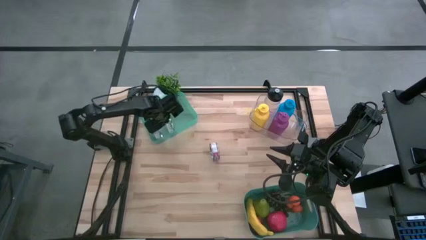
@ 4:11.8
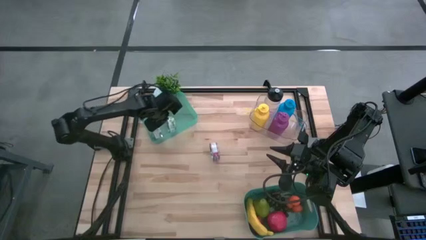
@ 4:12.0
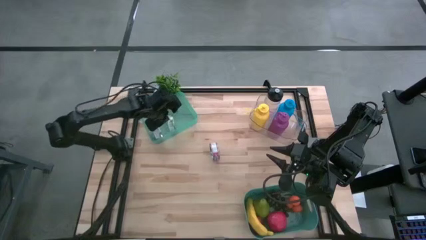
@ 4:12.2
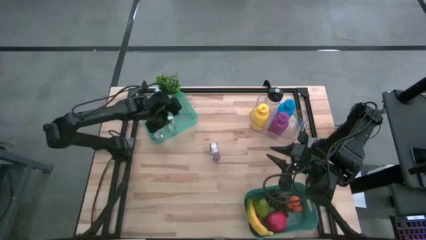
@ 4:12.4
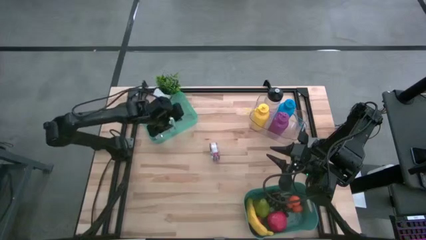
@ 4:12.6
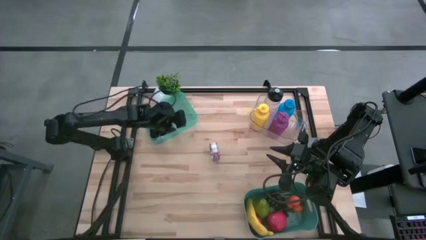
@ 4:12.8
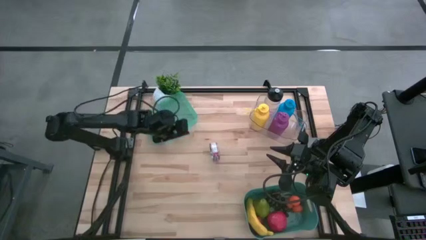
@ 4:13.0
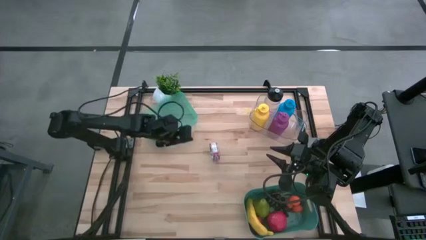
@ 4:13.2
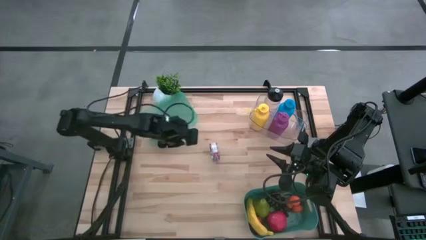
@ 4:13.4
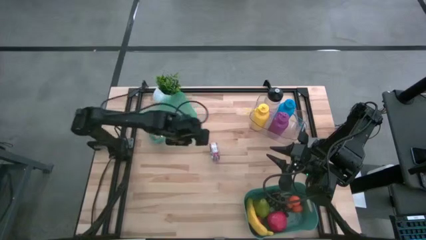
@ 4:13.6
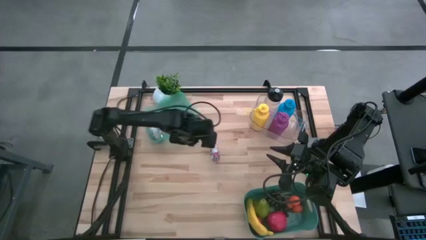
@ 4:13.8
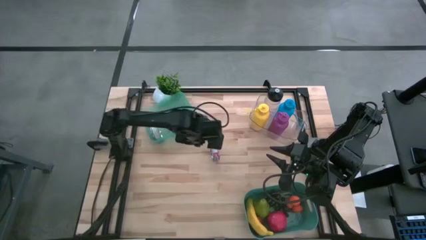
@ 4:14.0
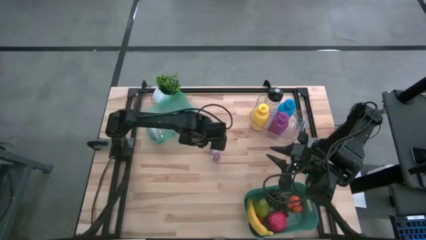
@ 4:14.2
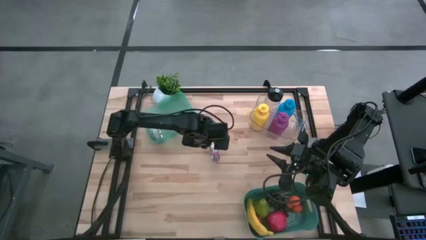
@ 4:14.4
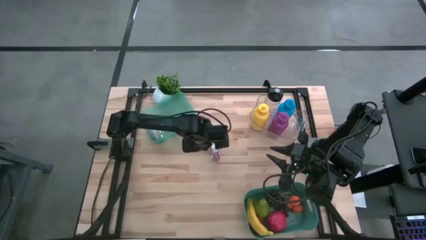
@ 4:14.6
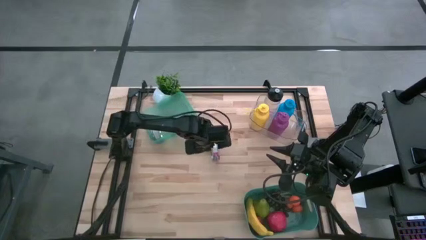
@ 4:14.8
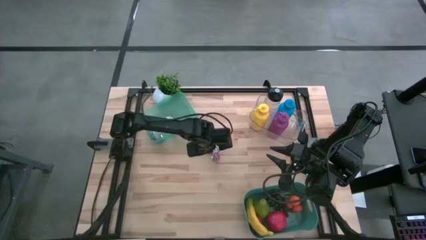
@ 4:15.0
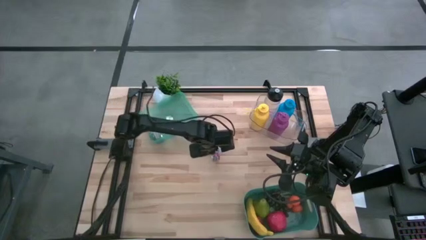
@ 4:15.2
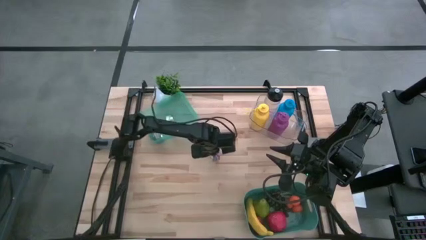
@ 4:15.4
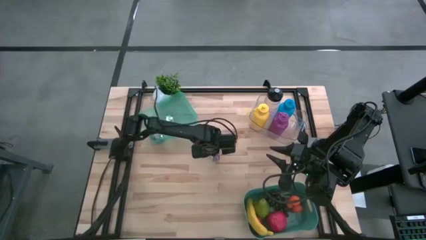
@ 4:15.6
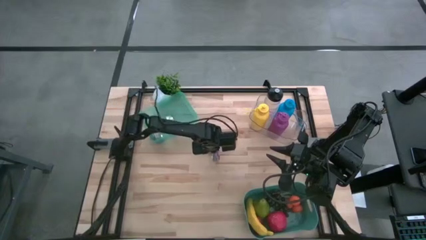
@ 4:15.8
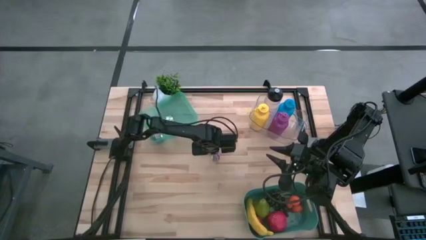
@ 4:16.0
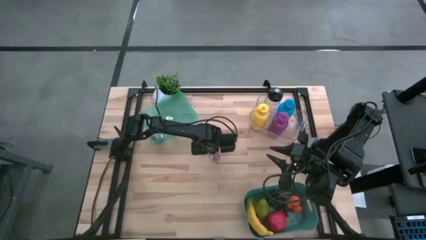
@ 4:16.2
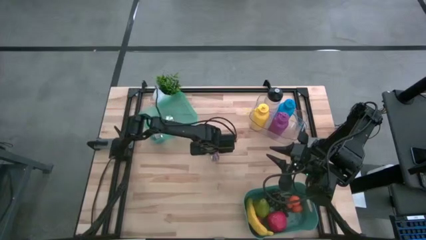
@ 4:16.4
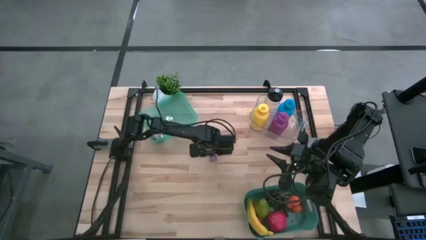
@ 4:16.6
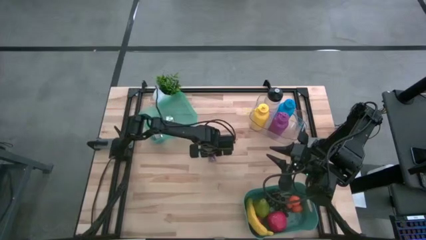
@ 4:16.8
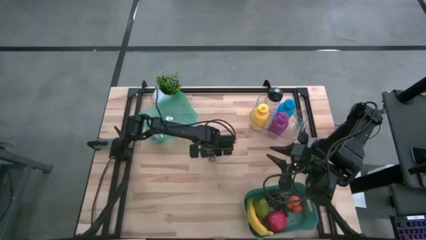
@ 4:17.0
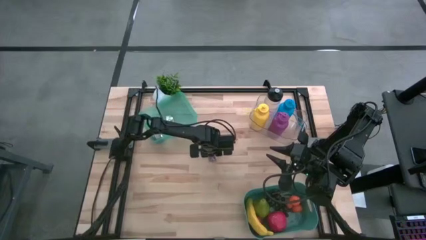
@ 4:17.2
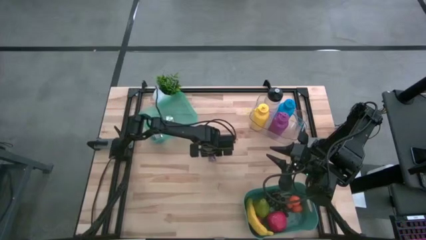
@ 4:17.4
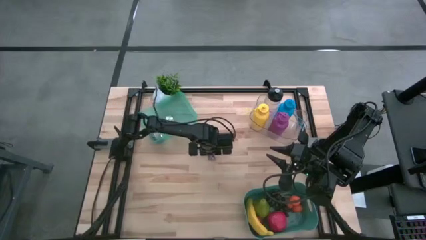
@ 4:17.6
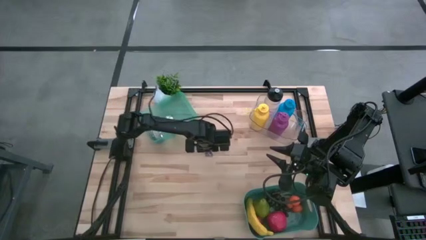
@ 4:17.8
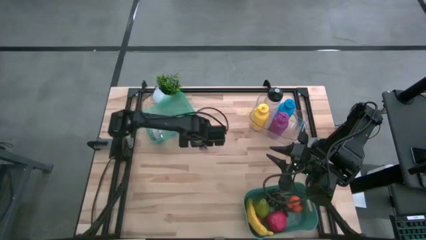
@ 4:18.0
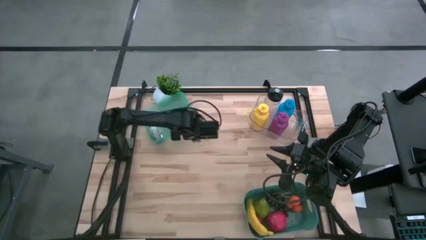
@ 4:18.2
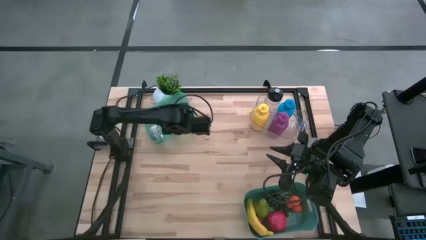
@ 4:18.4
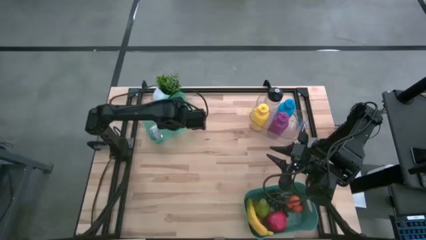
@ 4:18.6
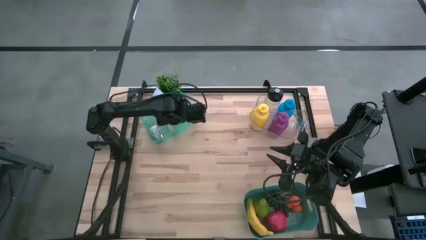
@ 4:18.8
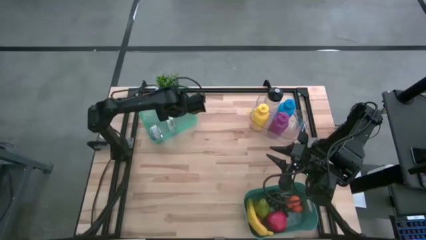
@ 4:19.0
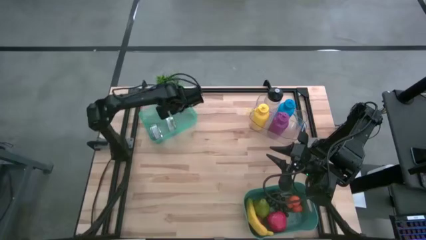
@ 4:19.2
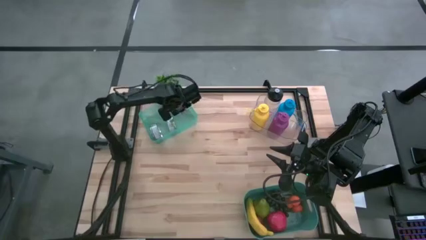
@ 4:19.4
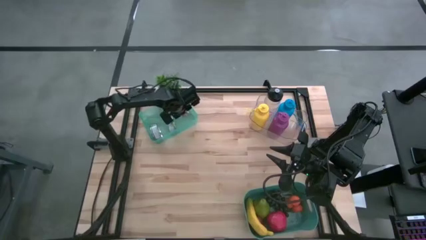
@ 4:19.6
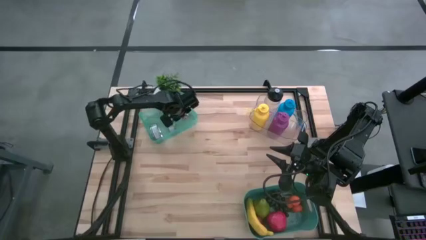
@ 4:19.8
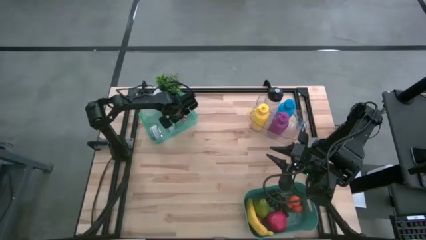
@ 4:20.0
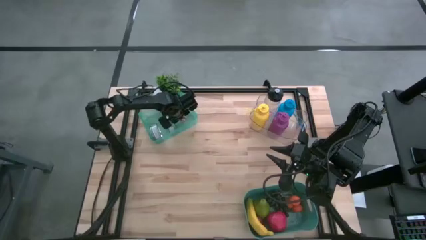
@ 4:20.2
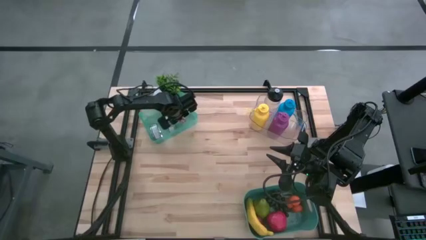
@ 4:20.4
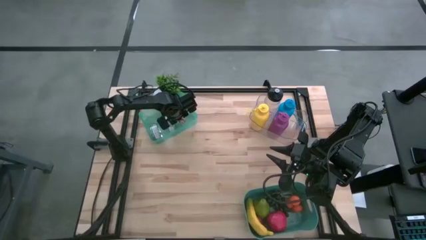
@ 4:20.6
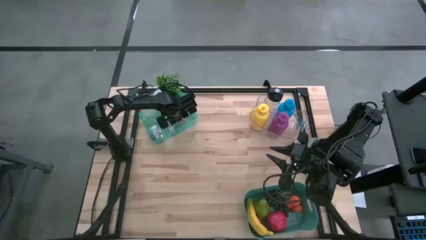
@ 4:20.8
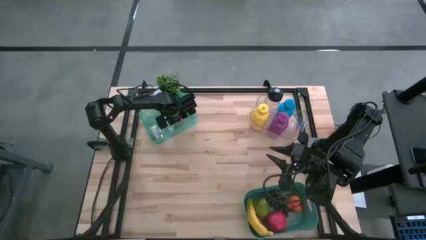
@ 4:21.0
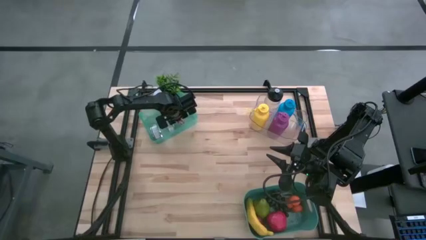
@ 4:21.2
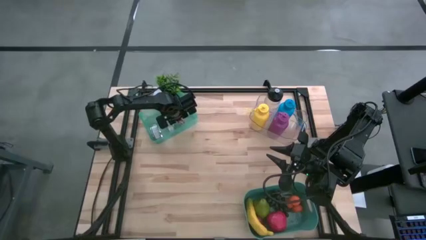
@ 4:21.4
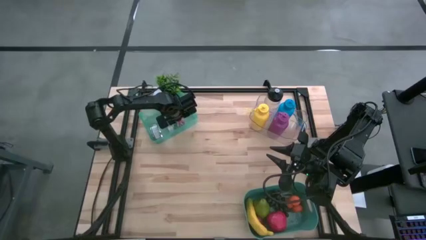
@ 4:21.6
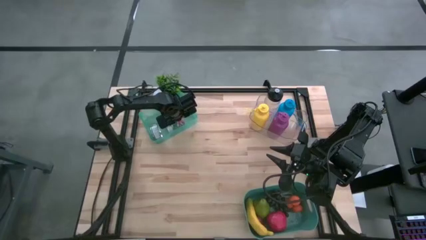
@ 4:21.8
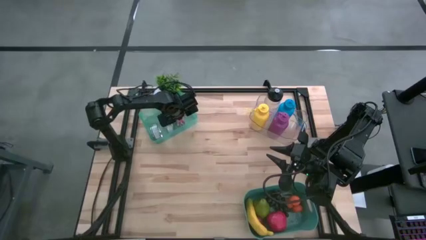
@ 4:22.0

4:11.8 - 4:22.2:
Task: Pick & Place Food Item
Put the red tuna can into the blue transparent bin

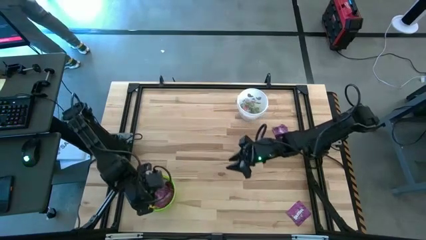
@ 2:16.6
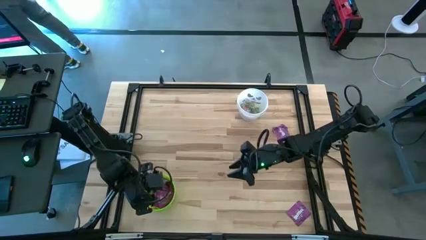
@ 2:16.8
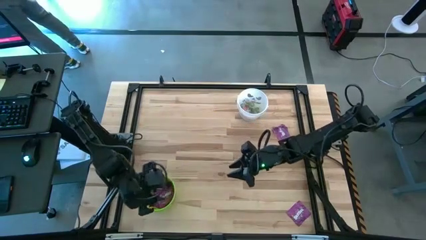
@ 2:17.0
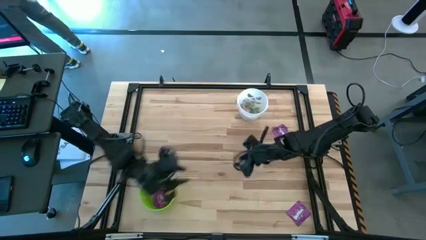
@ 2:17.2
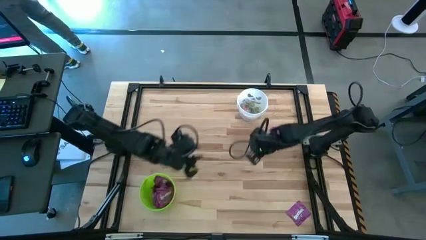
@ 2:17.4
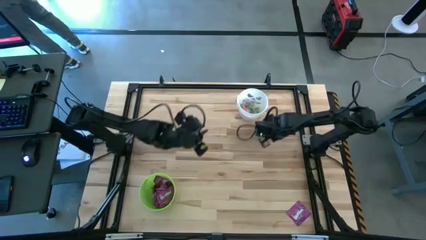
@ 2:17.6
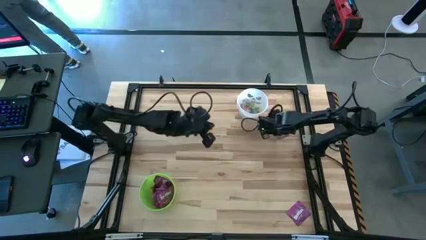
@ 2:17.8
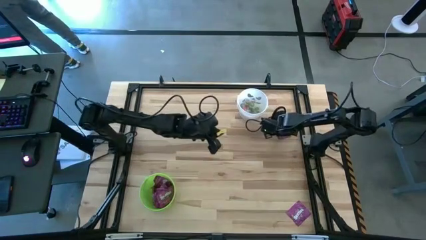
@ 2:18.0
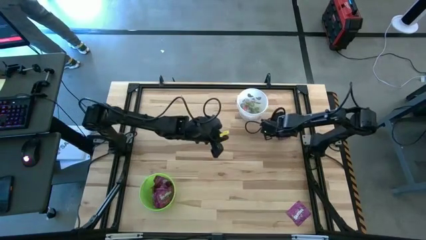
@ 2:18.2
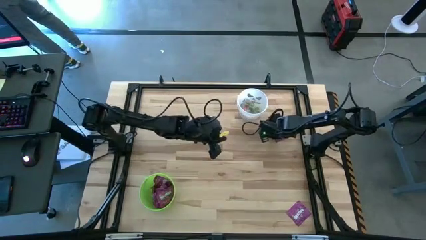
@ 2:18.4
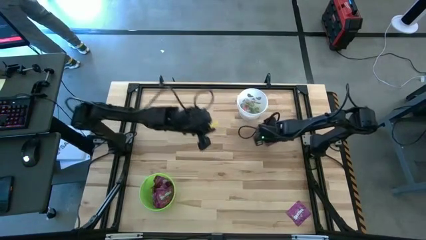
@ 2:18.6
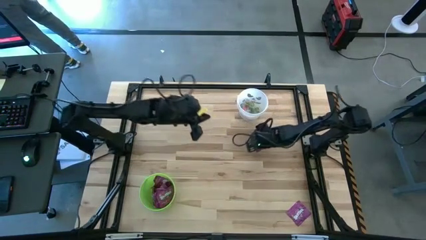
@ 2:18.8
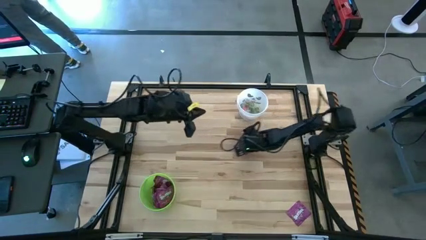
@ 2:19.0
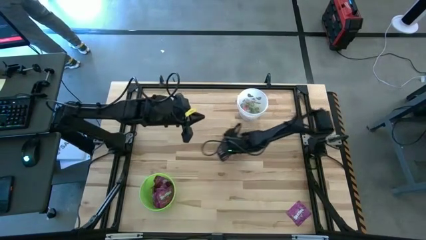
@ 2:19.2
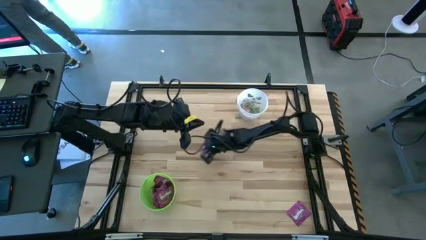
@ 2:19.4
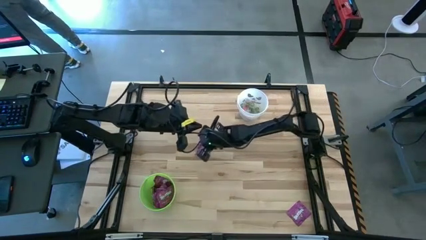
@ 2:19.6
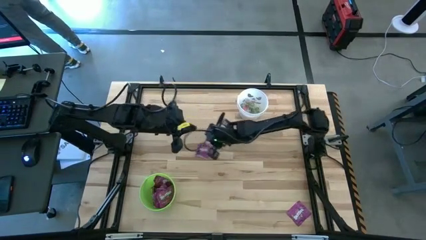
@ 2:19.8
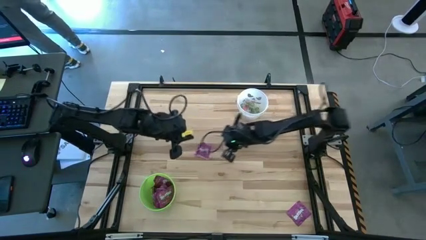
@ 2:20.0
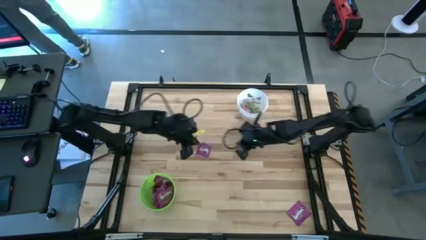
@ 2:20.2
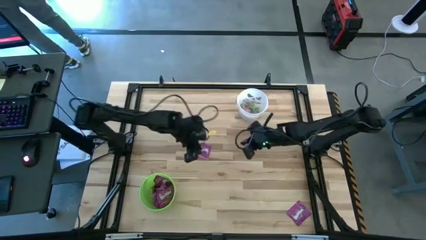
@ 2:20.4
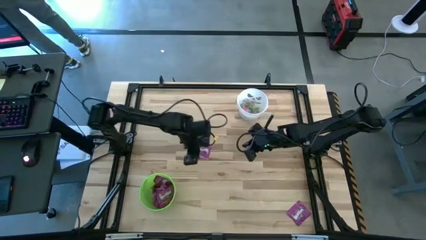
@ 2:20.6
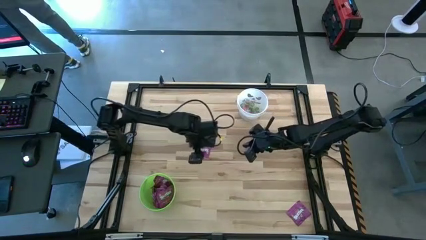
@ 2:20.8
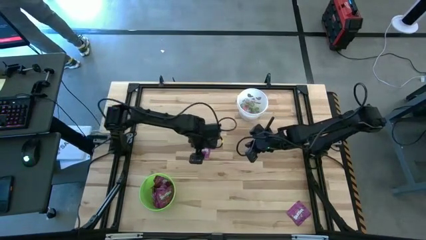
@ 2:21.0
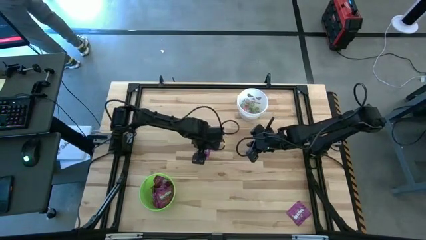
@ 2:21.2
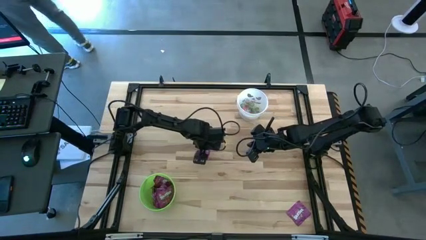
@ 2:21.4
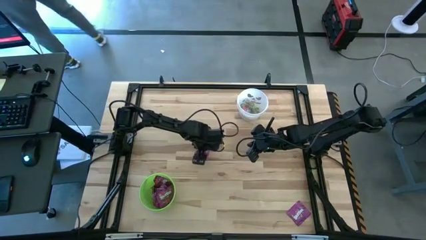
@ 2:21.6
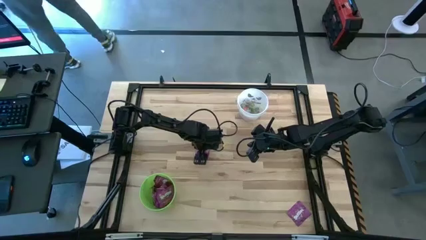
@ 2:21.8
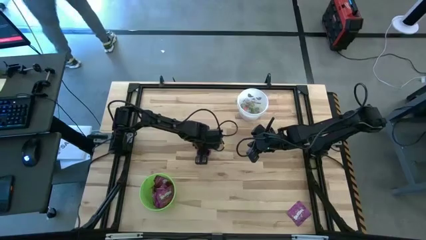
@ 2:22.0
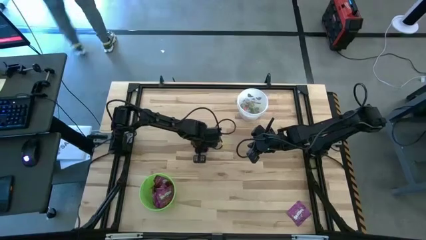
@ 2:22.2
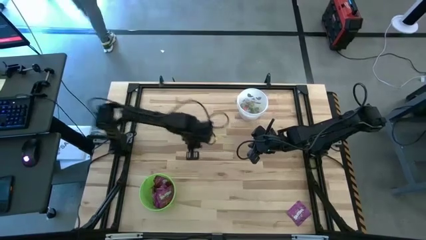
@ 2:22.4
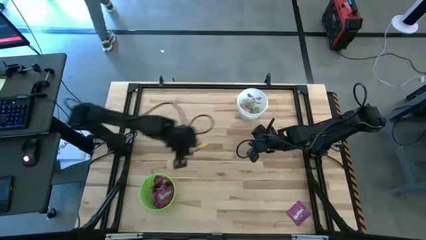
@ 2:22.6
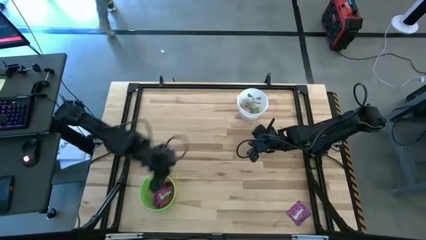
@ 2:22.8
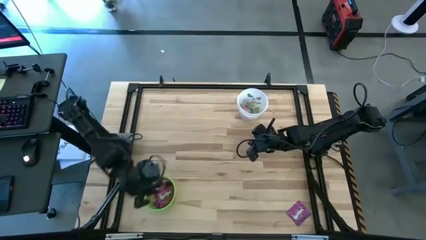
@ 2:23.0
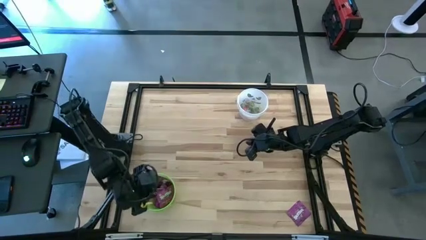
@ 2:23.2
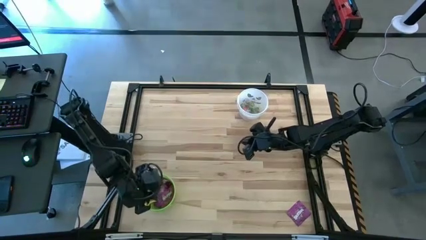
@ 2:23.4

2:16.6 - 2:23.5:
Task: Sort candy by brand, put in halloween buckets
Put the purple candy into the green bucket
